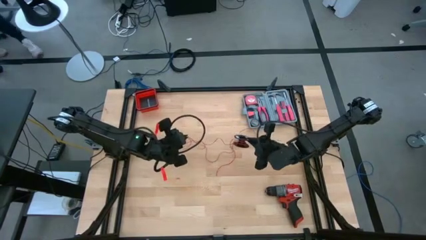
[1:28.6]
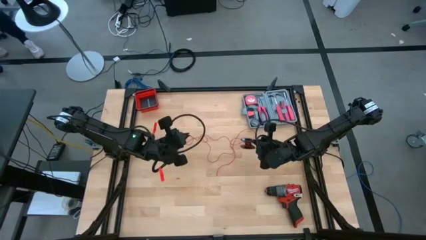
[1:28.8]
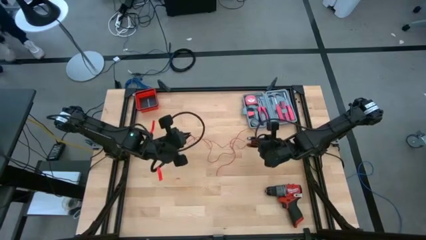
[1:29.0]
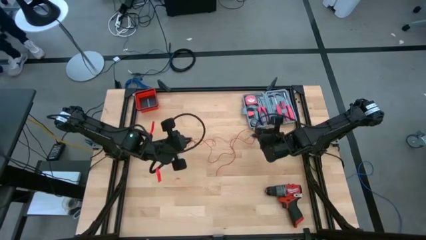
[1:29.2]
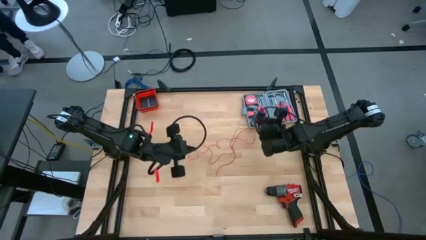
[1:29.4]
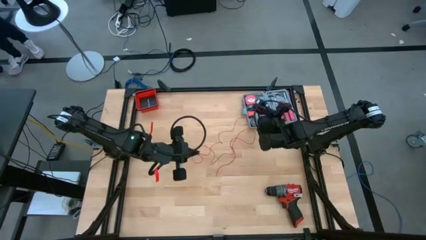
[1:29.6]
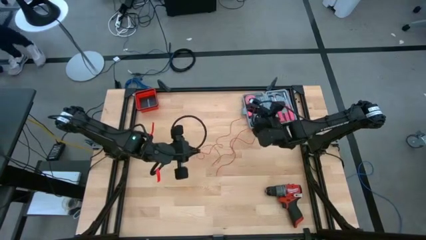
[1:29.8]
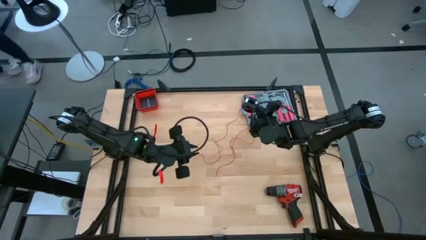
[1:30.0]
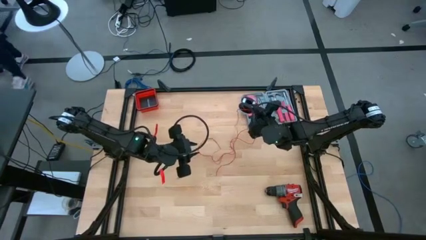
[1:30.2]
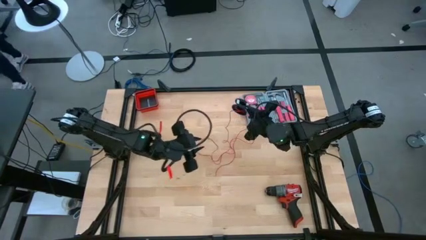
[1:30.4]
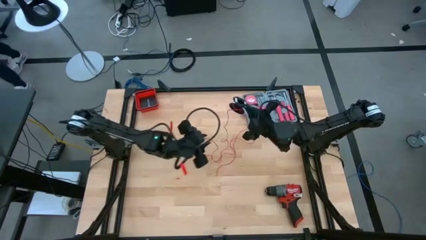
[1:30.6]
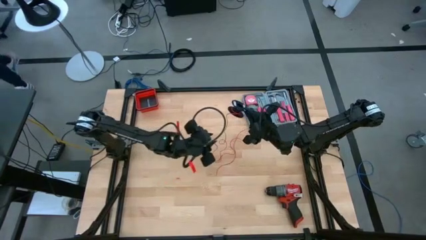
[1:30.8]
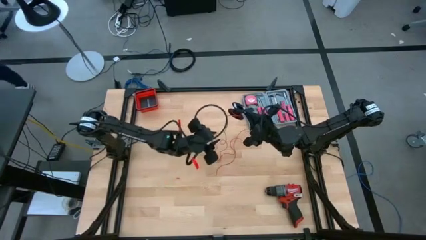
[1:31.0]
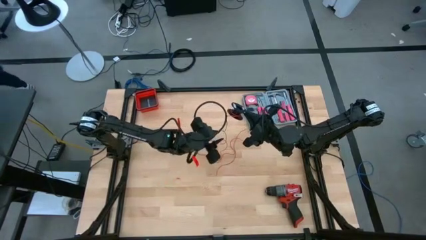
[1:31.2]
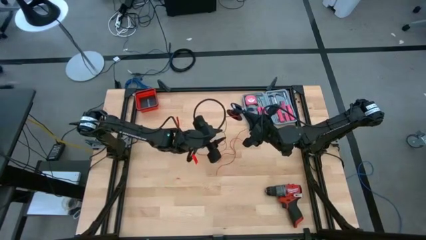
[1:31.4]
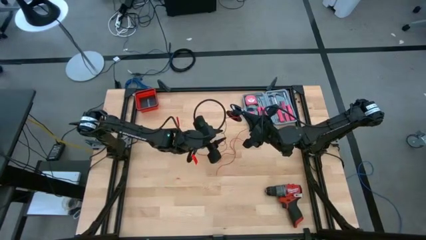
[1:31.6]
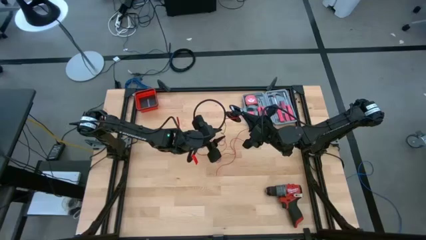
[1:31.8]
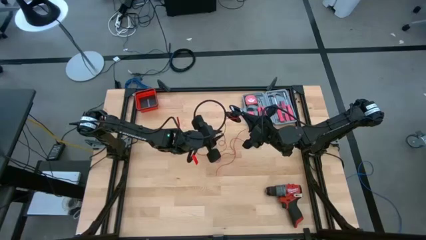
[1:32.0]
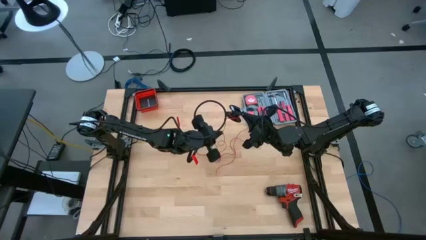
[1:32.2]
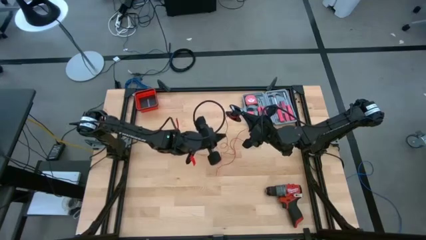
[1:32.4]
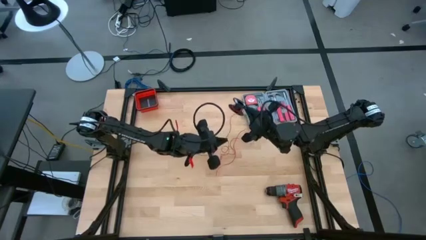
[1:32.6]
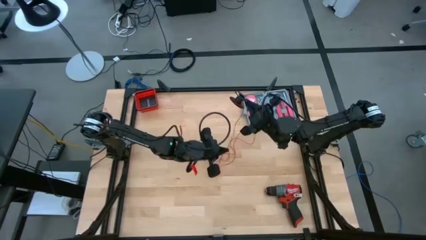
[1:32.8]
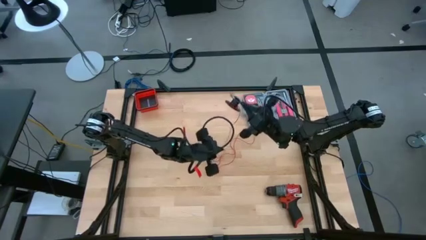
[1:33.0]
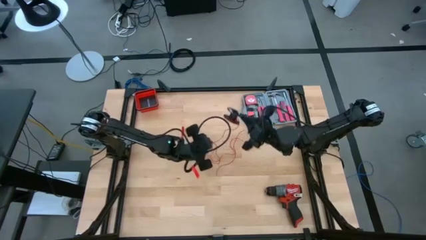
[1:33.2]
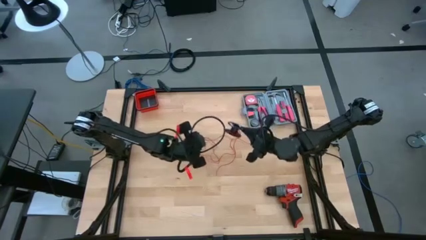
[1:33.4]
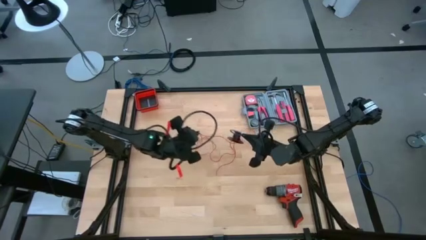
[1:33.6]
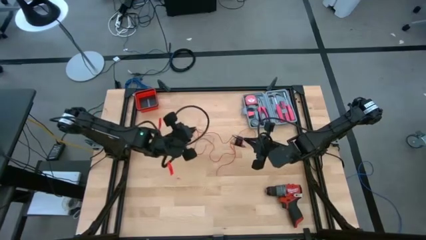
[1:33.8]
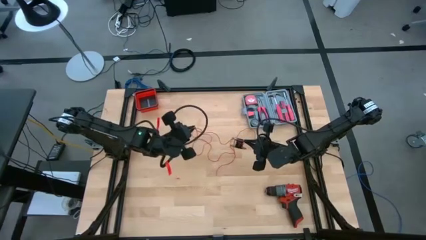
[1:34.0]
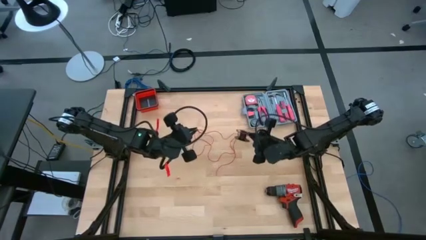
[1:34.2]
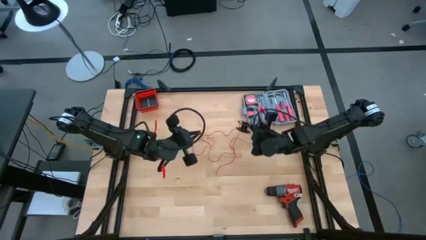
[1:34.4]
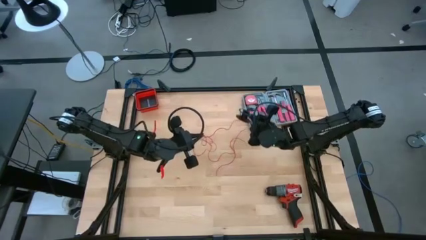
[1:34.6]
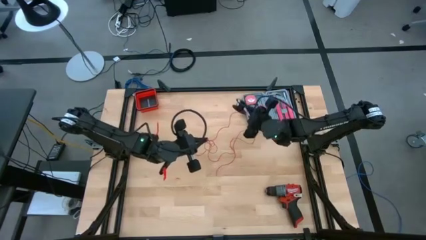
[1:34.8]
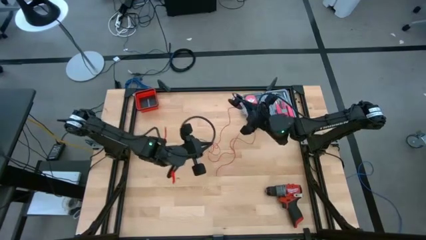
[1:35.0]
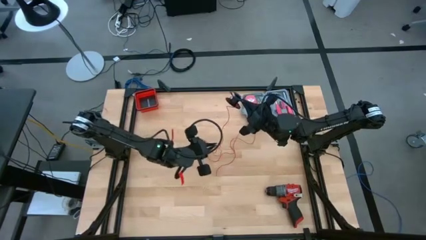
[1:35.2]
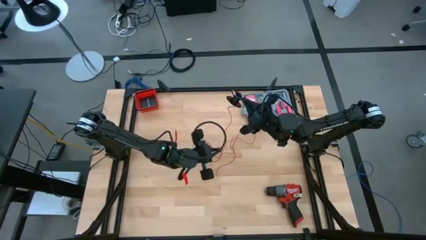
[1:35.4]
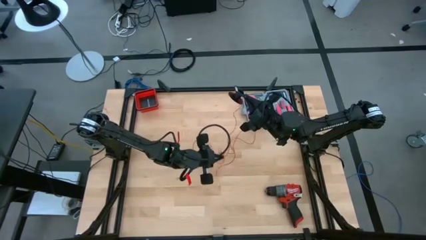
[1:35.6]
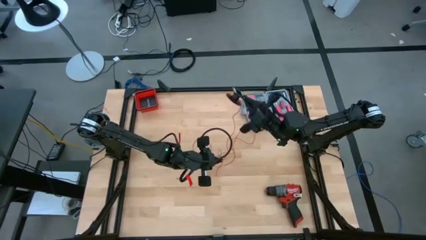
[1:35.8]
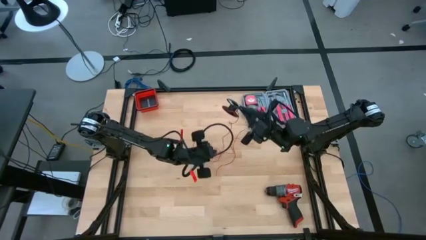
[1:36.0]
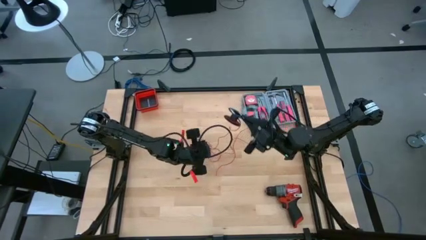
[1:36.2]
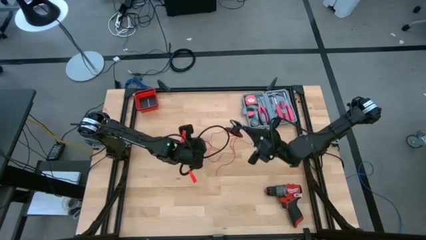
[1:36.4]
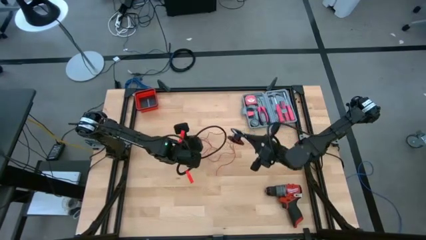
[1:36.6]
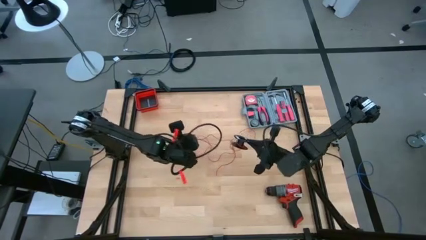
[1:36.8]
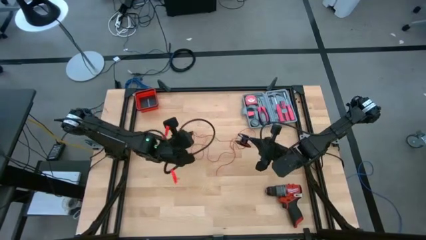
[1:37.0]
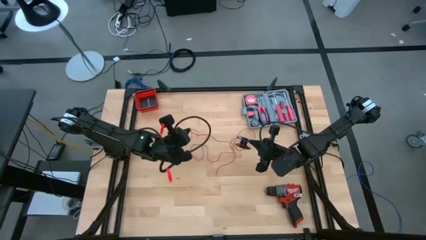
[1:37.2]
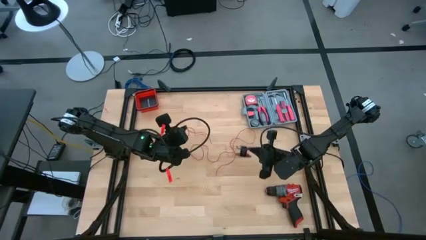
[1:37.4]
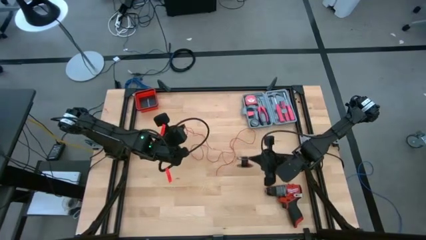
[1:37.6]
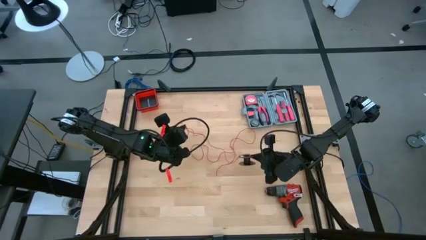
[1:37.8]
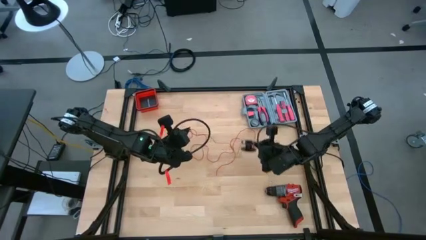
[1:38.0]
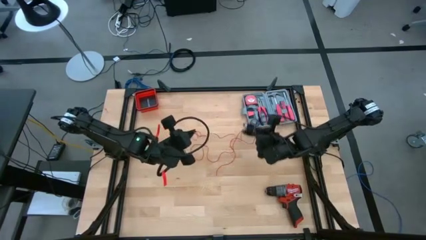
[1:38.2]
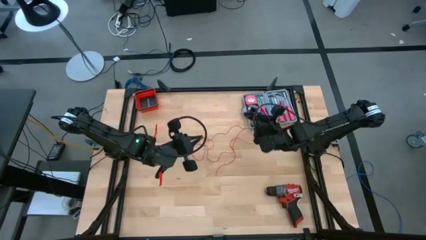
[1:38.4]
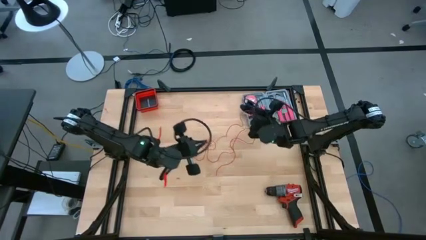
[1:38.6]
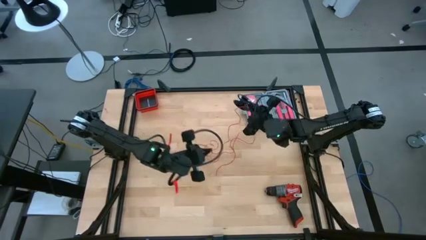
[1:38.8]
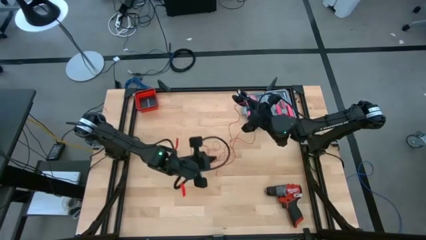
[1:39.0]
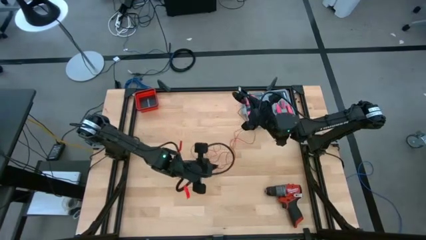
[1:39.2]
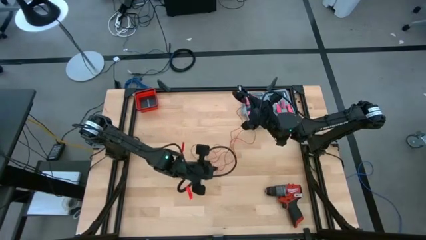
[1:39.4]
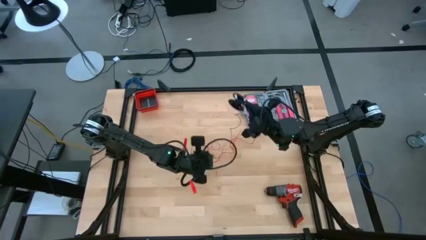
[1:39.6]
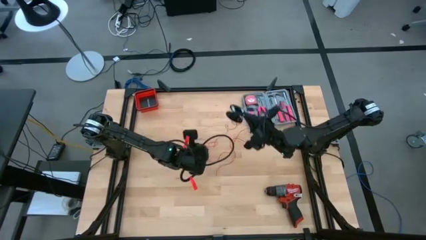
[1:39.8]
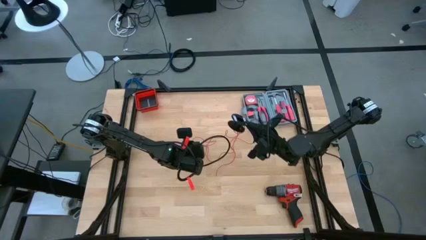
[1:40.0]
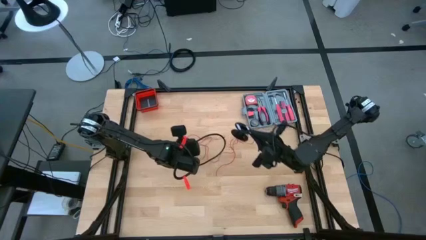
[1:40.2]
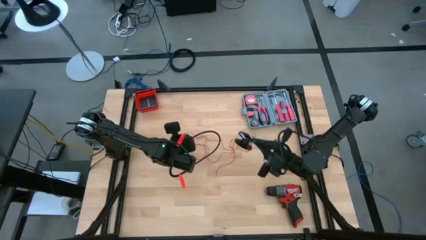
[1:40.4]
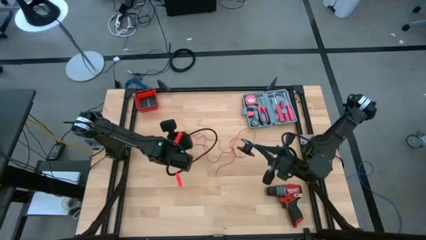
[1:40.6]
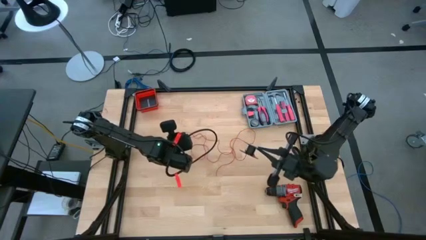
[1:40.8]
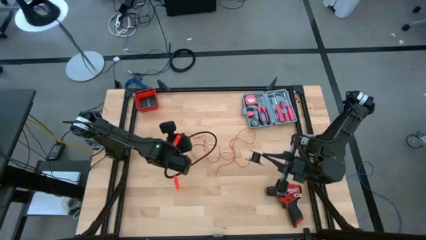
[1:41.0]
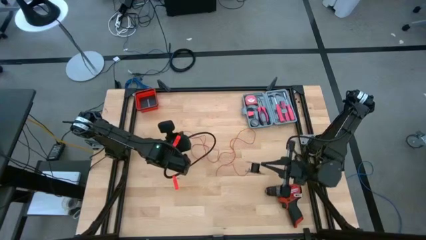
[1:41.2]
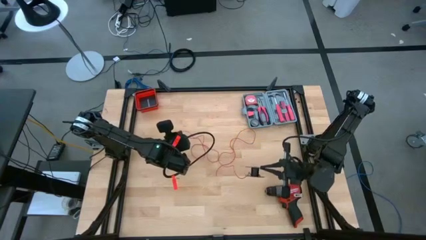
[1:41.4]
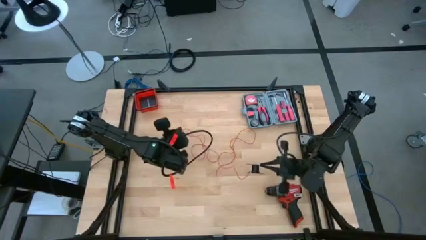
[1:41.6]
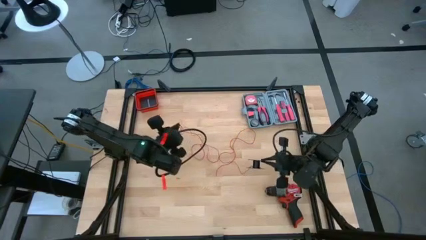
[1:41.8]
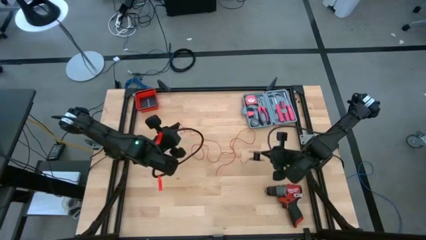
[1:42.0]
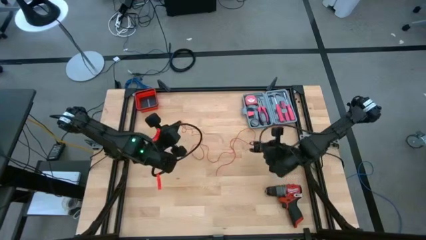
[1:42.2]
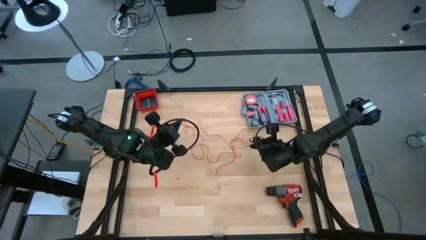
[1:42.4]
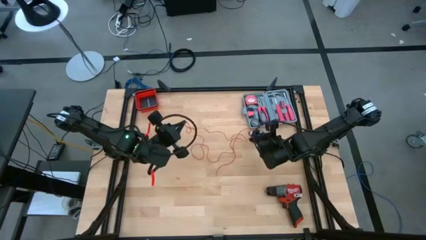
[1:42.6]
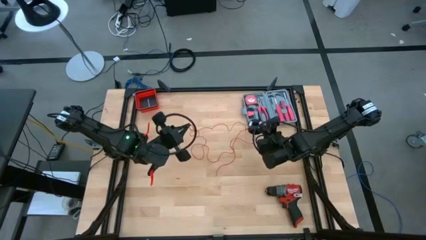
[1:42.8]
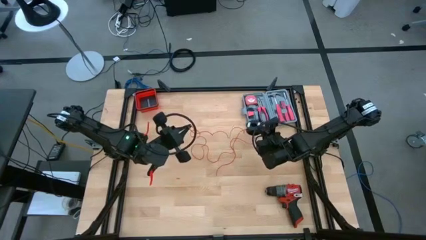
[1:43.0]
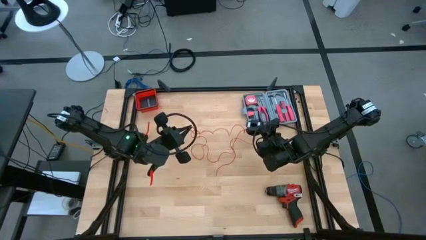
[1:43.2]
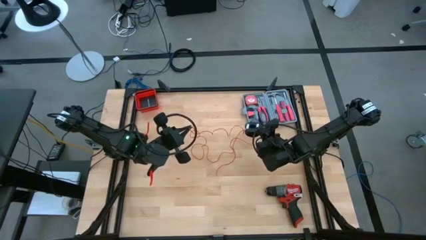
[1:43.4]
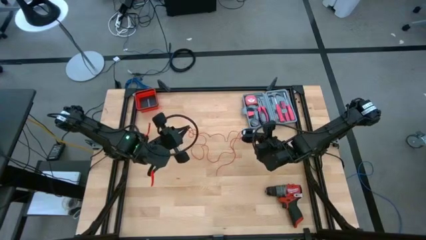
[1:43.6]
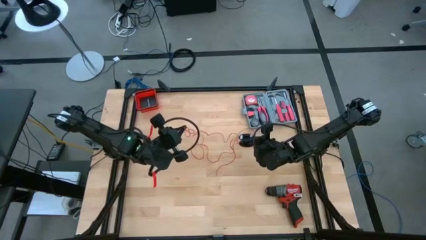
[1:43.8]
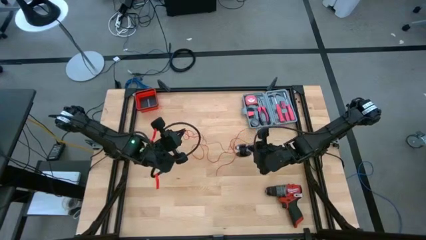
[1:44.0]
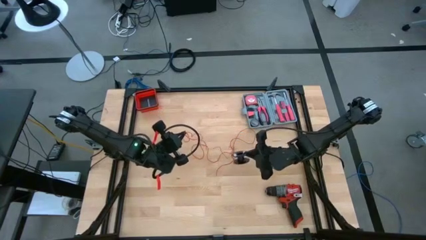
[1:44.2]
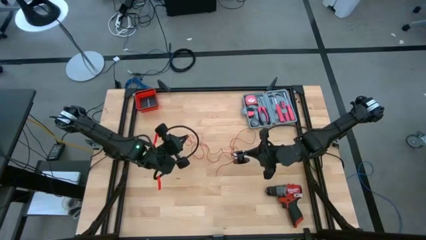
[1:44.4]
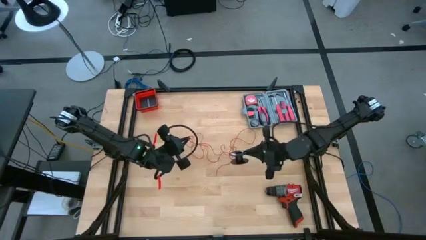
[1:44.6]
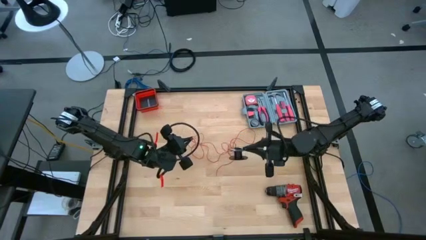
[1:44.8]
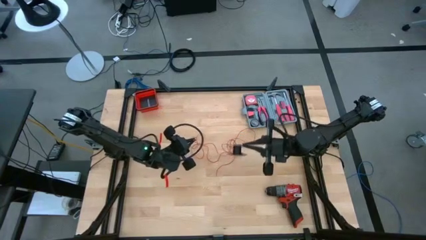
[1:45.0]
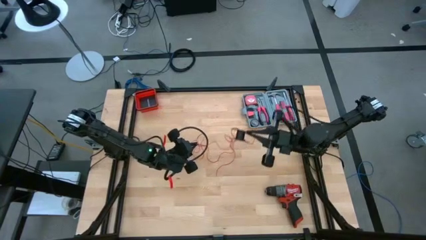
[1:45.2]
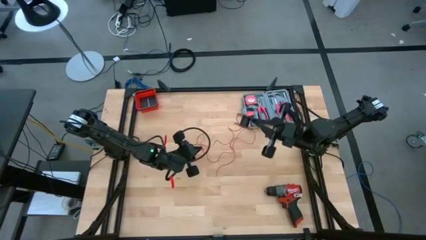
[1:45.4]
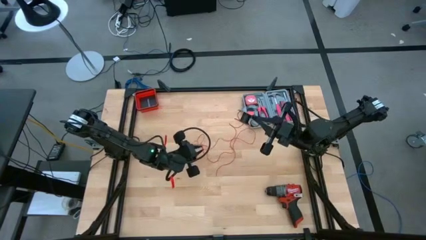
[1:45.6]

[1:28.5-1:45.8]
Task: Coil cords
Uncoil the red wire from the black spool
